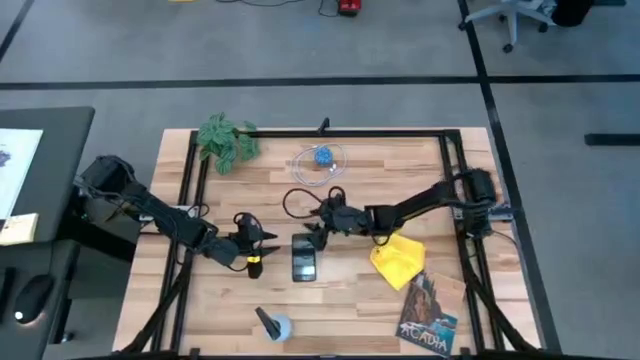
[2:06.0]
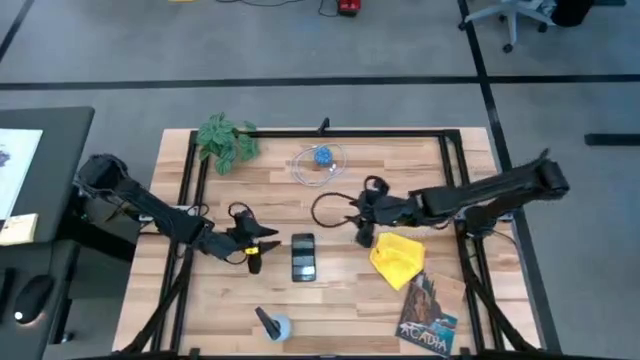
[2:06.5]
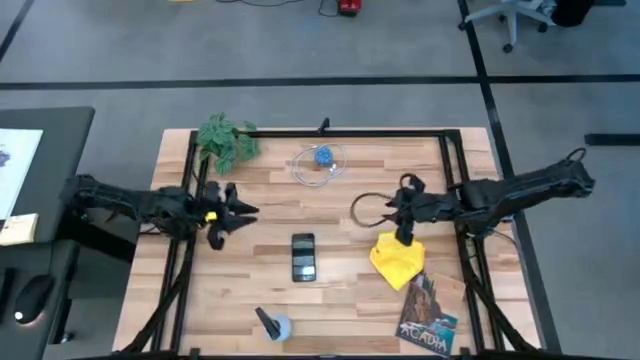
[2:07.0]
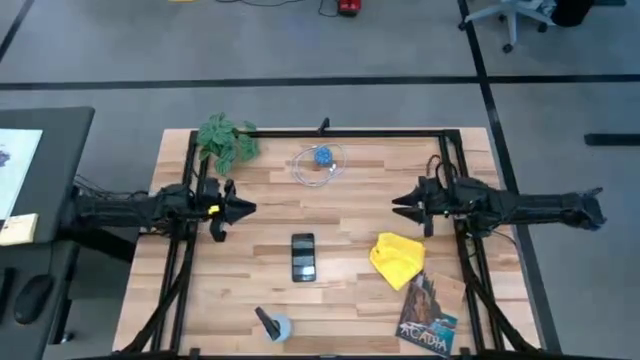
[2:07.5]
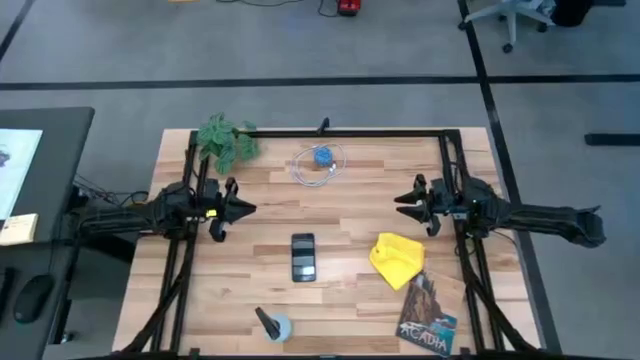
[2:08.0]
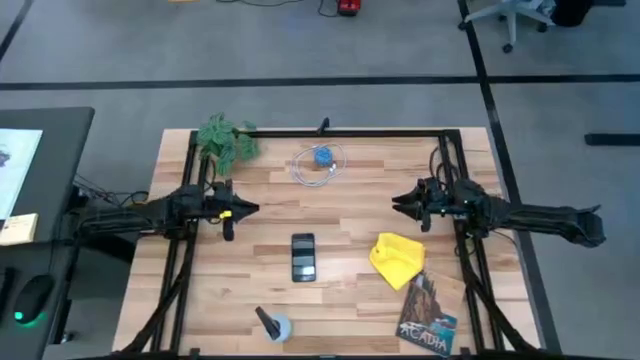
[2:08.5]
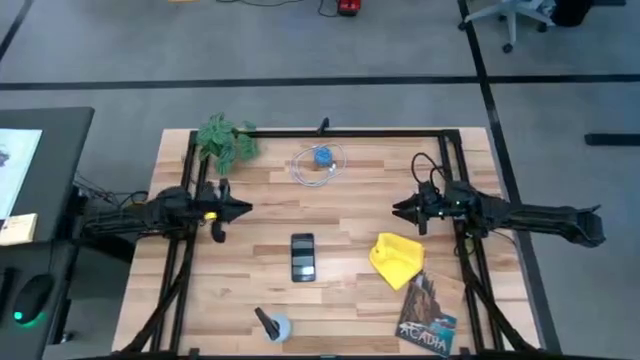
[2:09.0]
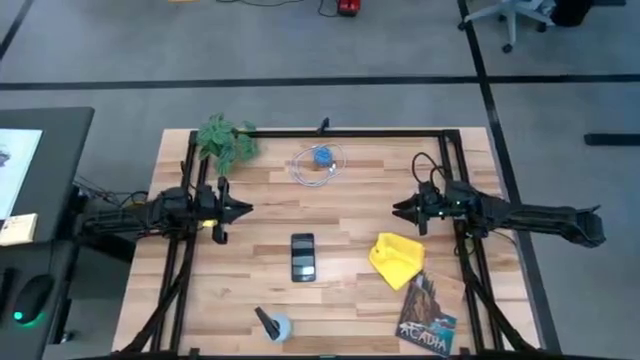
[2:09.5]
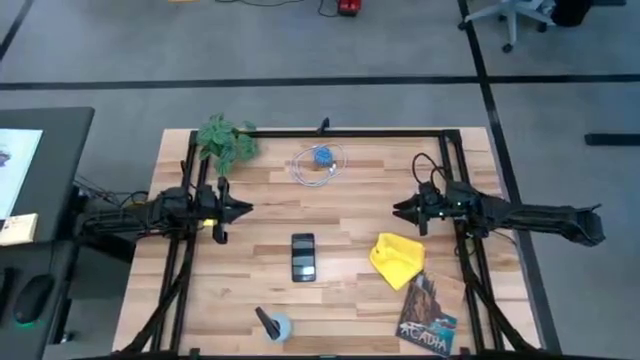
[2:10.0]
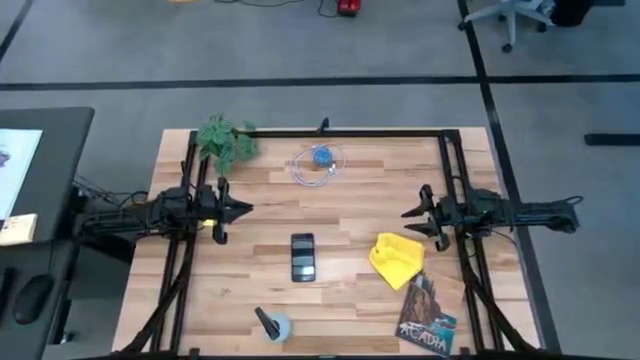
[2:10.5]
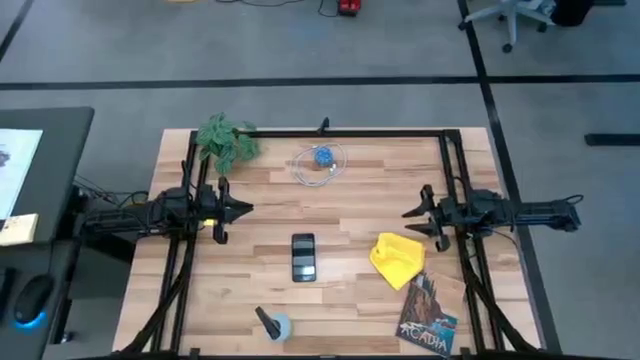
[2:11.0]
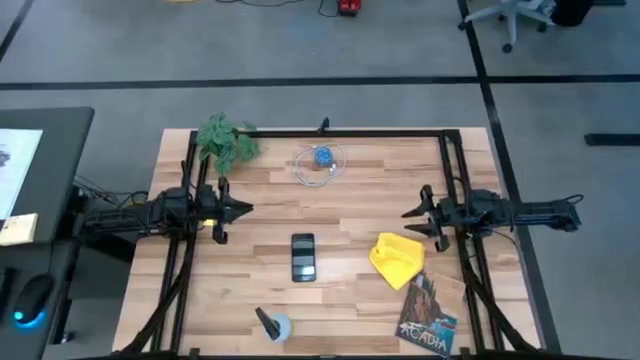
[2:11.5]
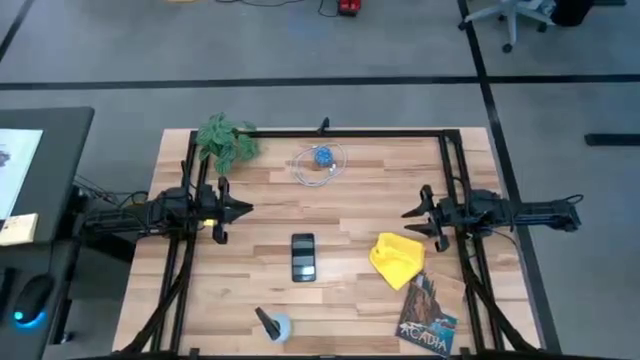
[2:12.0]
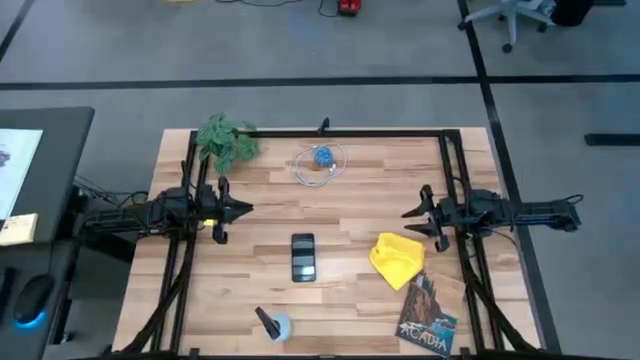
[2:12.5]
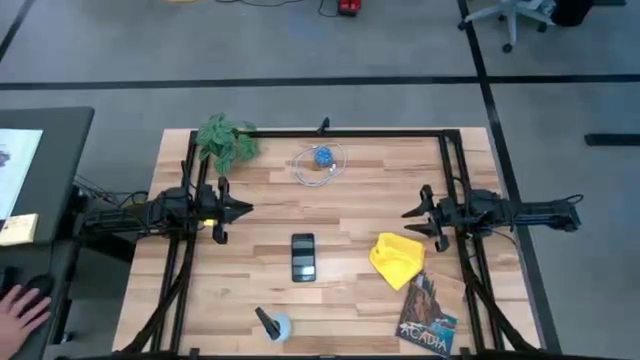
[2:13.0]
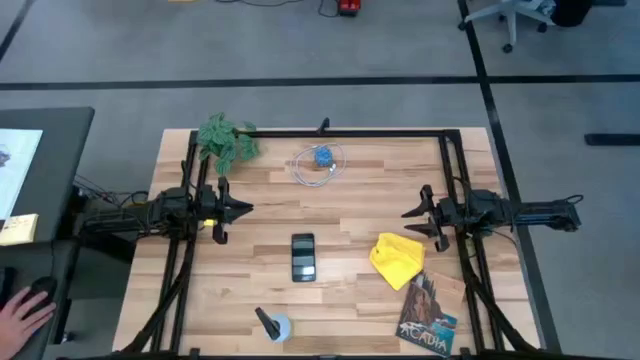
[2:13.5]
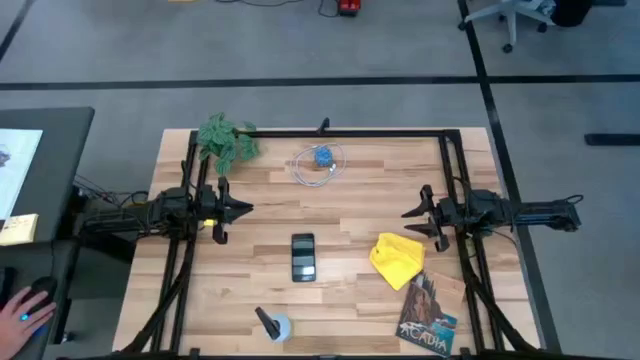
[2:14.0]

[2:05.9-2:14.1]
Task: Apply microfiber cloth
Return to Home Position

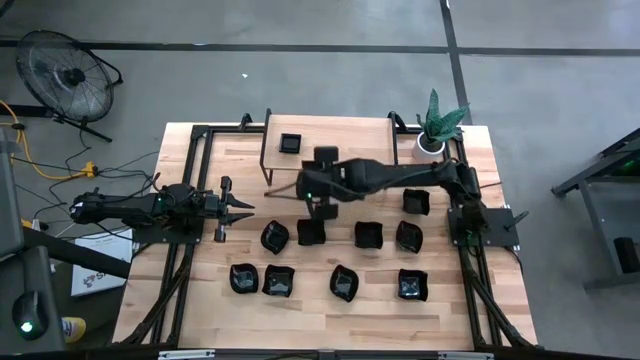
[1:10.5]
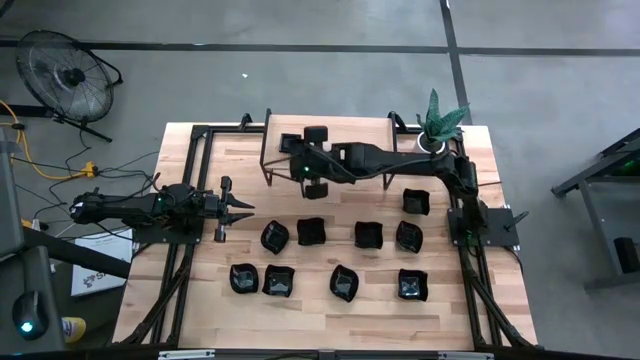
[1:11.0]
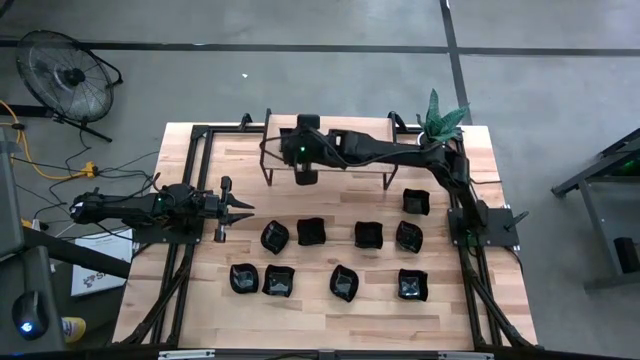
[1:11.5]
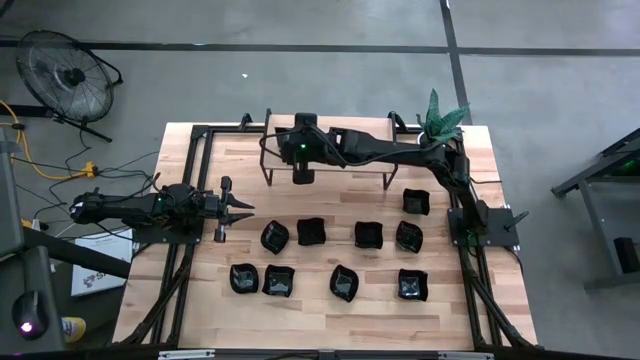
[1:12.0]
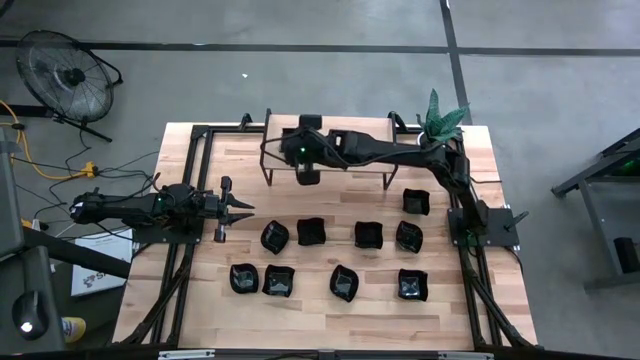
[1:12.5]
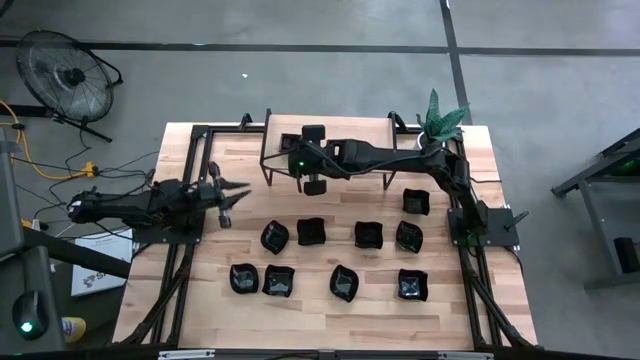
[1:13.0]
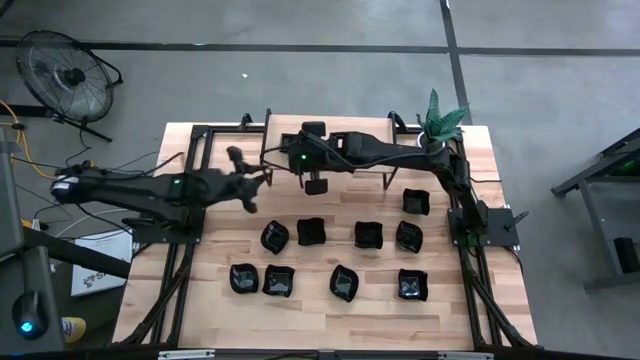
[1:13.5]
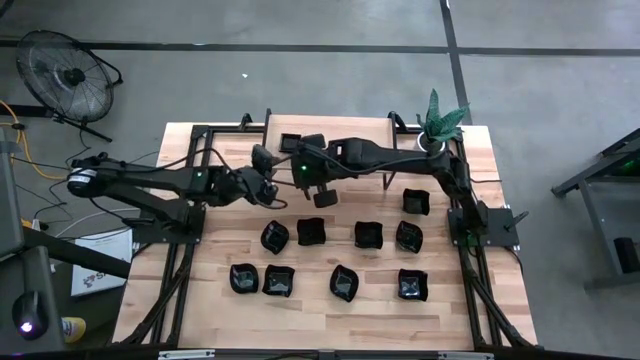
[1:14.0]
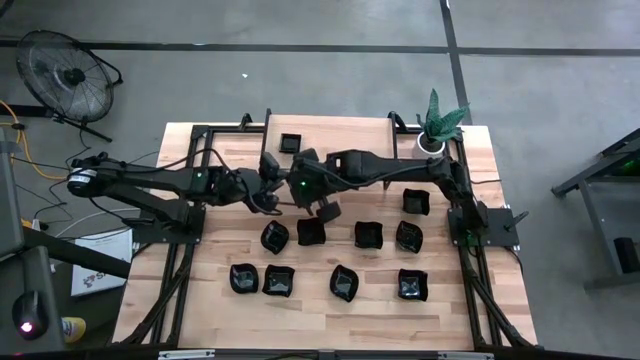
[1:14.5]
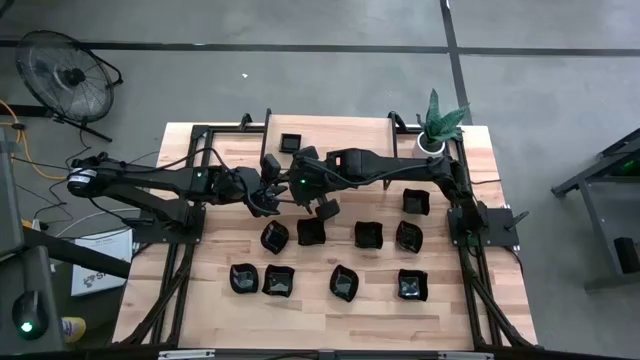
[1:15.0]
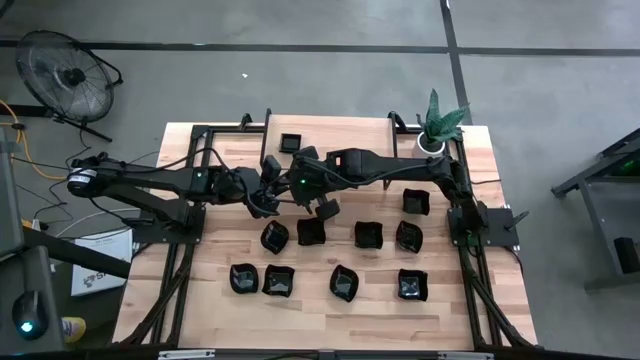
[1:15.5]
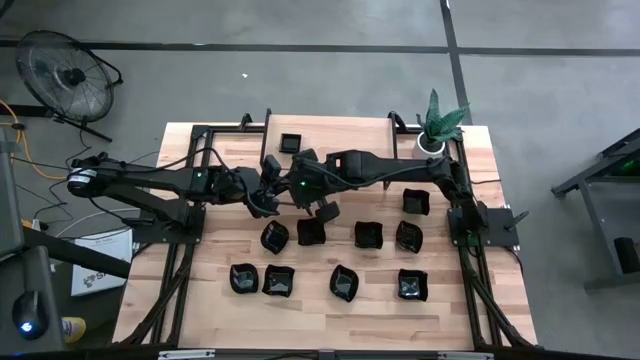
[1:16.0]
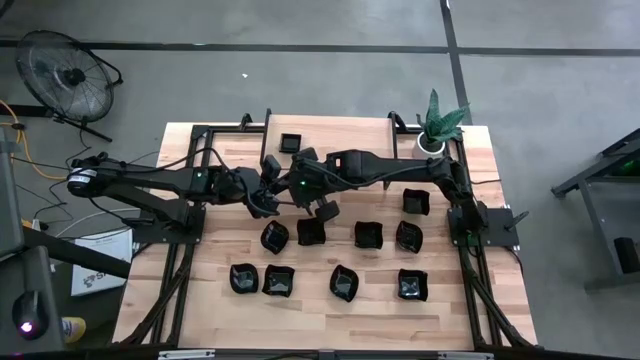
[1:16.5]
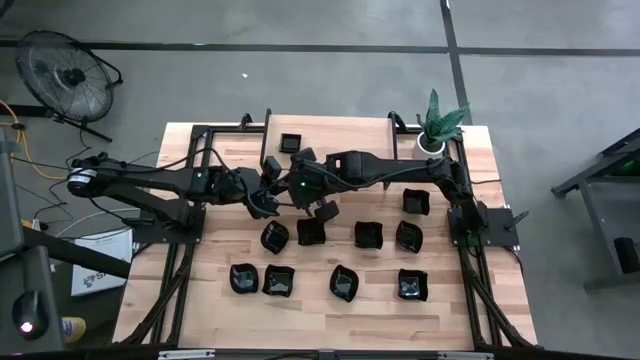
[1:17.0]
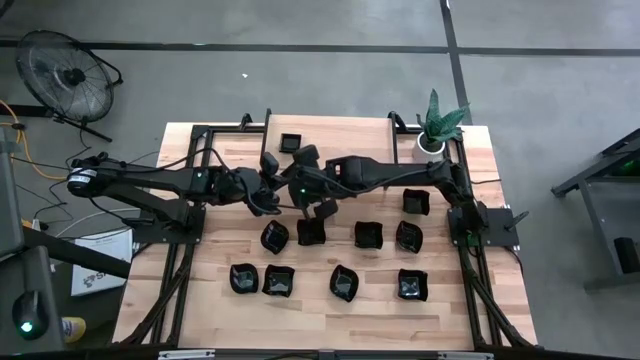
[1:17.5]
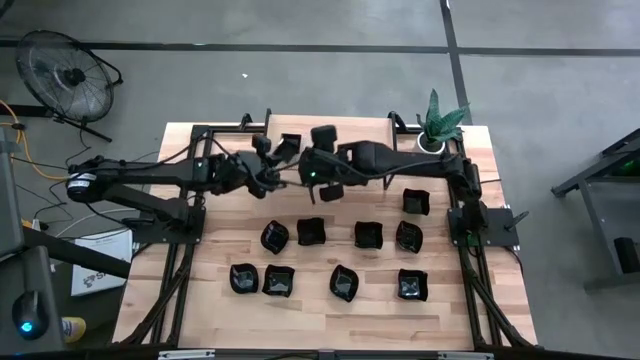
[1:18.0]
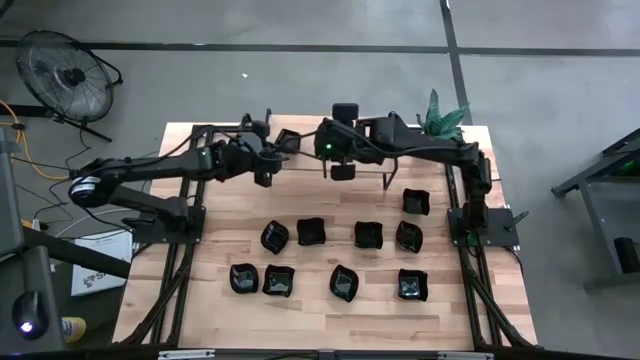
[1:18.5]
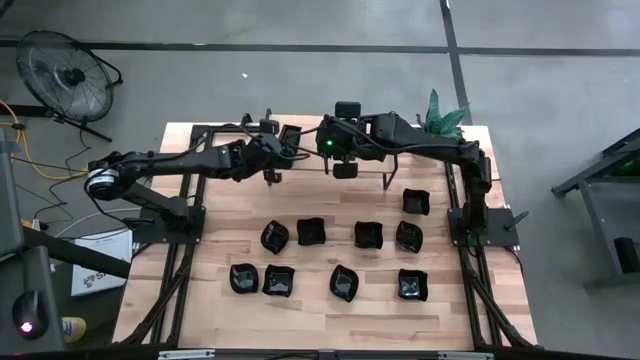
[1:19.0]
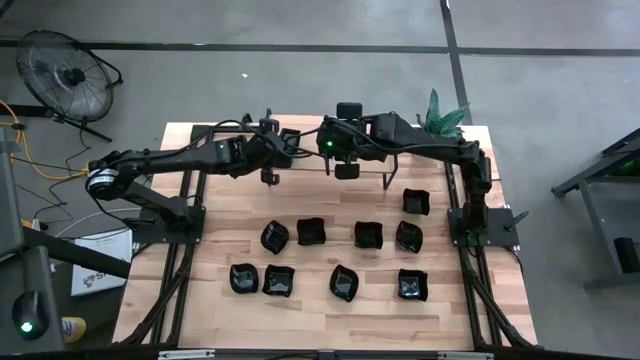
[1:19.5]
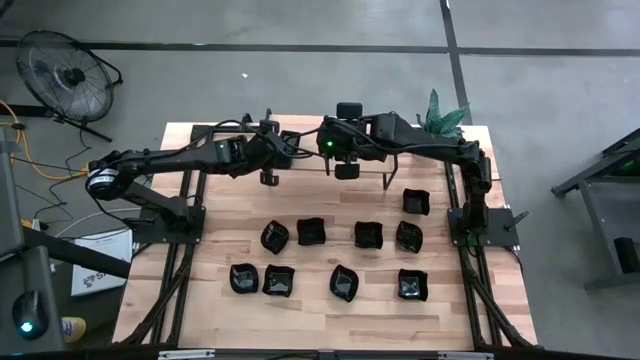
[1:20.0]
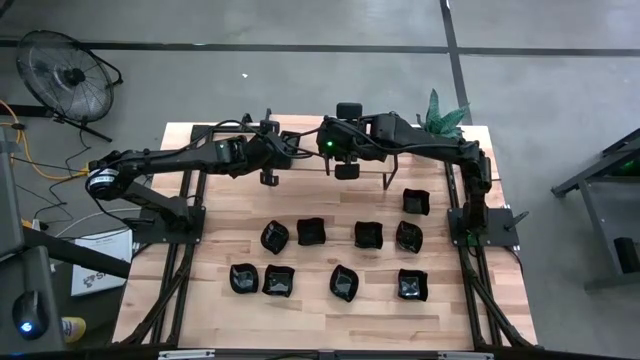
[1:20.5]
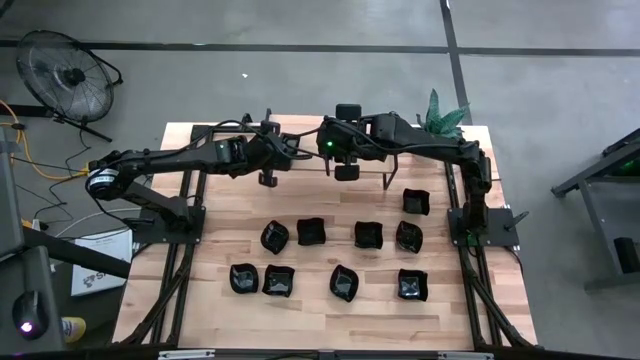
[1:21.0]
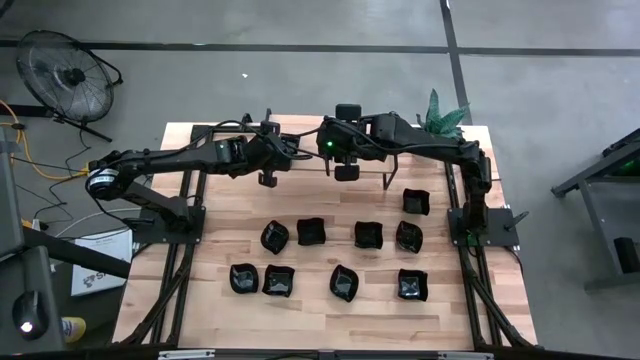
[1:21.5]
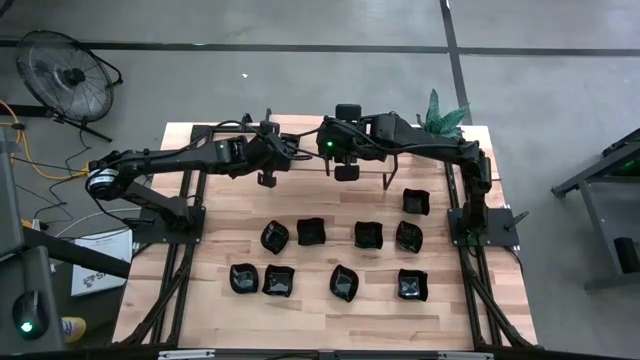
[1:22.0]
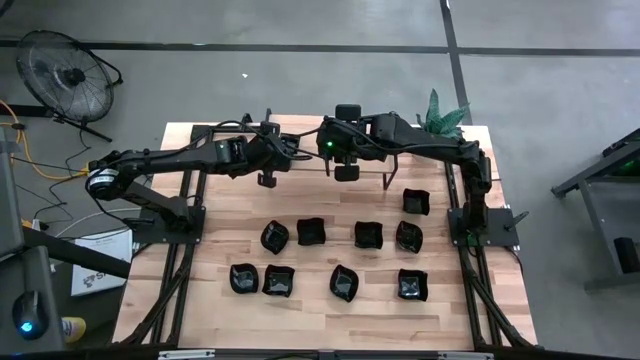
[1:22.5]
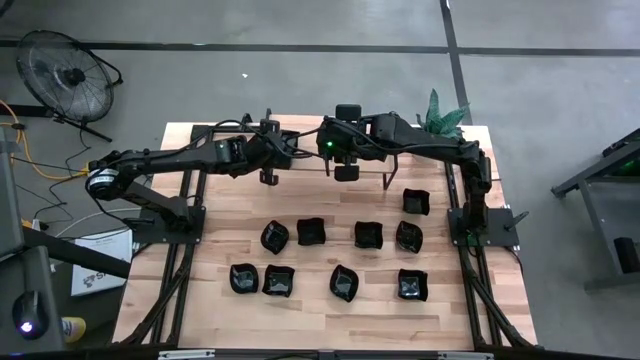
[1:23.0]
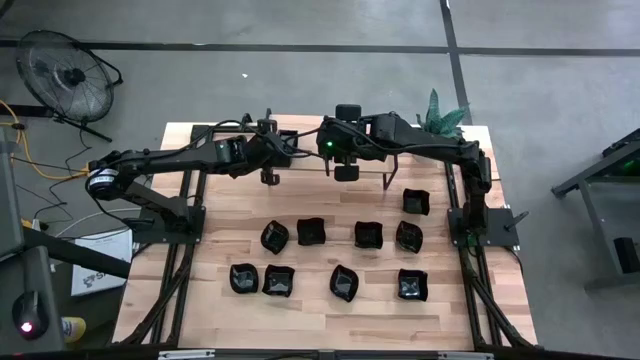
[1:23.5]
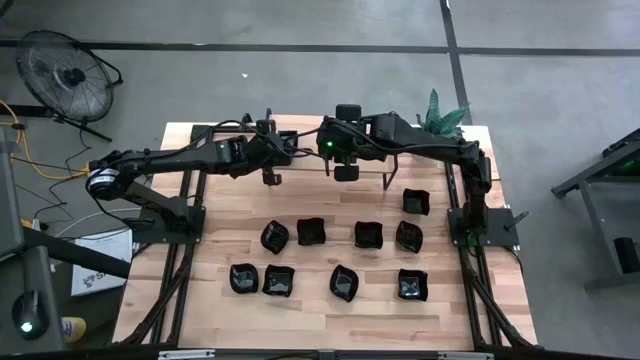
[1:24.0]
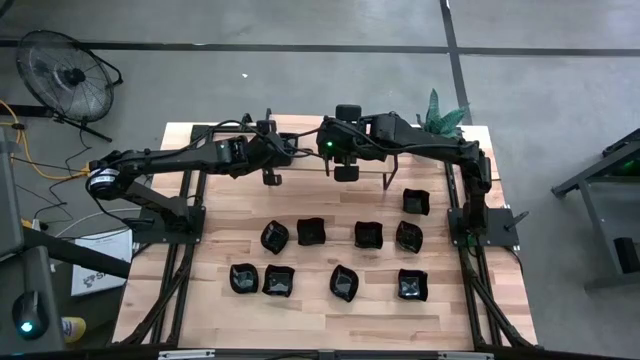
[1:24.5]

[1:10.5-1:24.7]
Task: Pick & Place Mini shaped plates
Stack the black square plate on top of the stacked black square plates on the shelf
